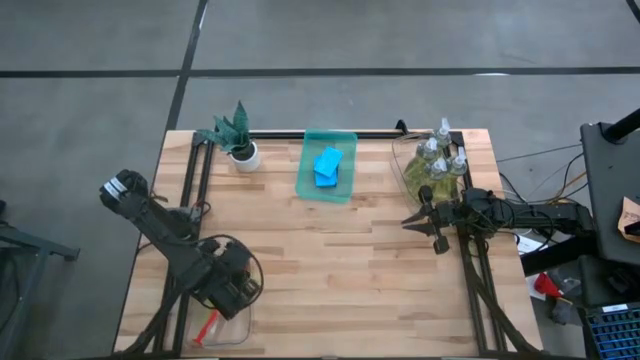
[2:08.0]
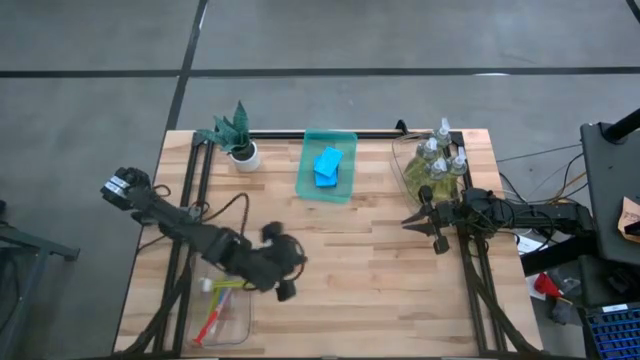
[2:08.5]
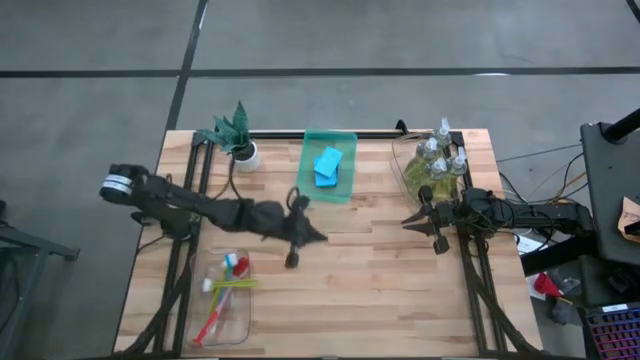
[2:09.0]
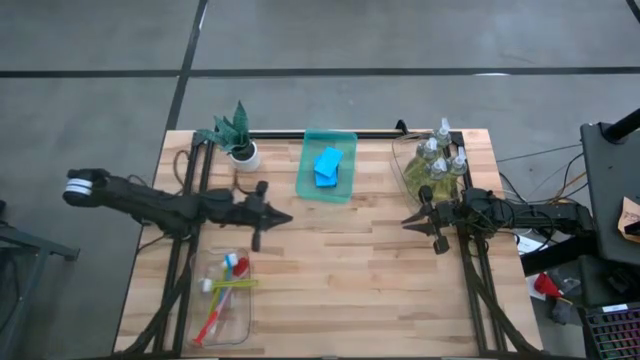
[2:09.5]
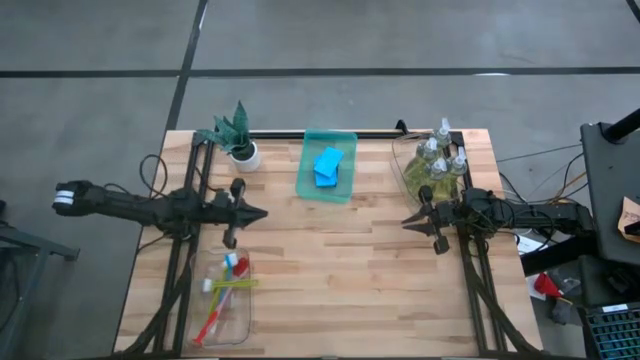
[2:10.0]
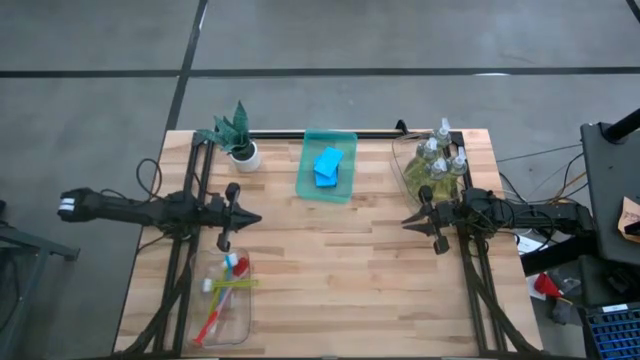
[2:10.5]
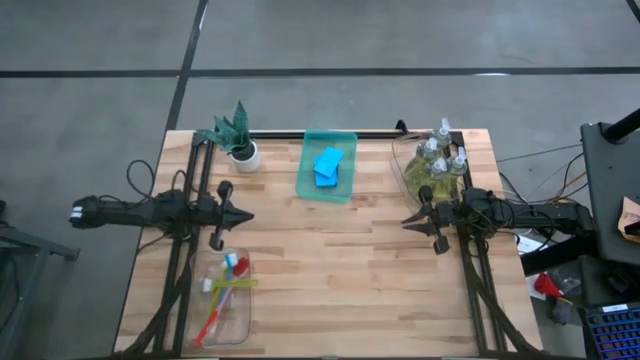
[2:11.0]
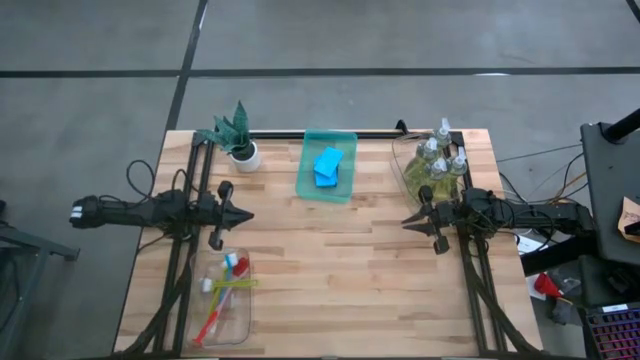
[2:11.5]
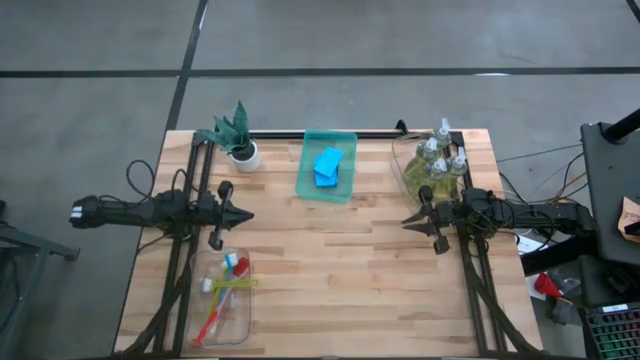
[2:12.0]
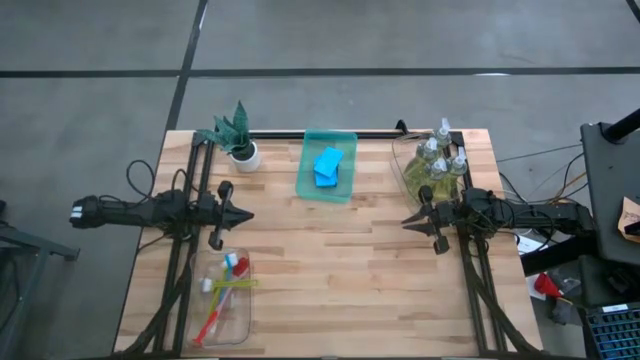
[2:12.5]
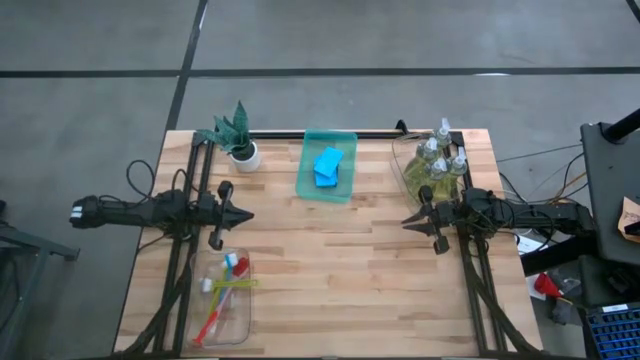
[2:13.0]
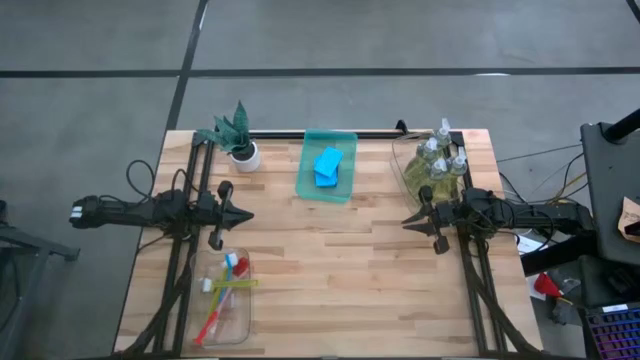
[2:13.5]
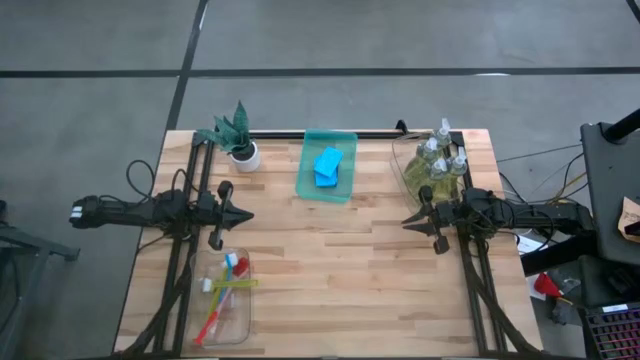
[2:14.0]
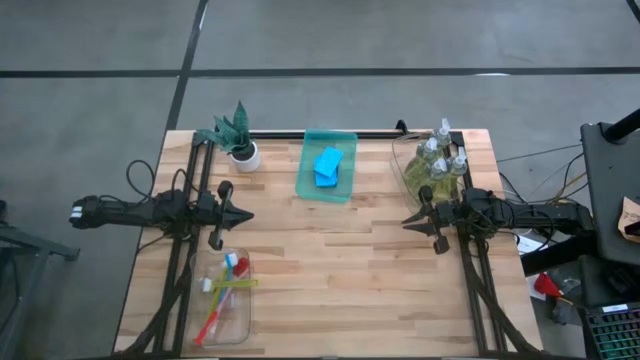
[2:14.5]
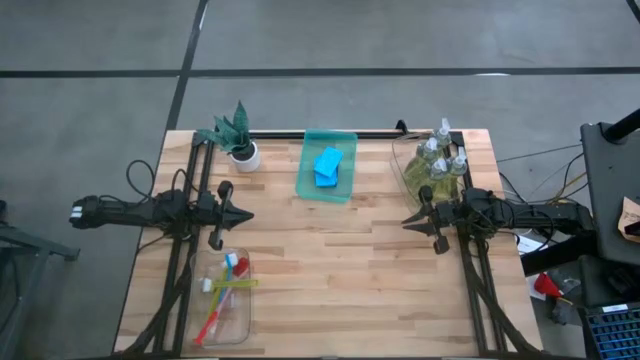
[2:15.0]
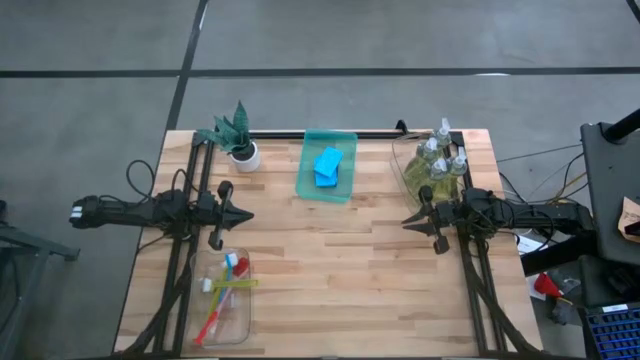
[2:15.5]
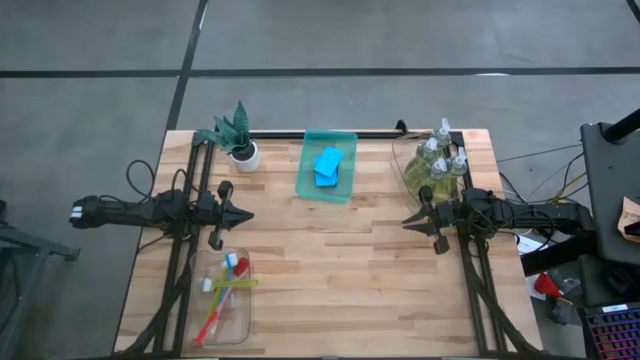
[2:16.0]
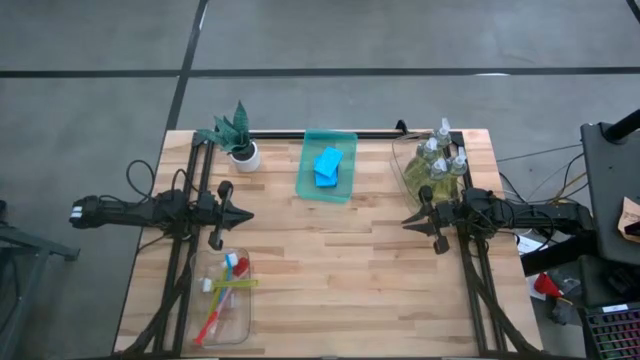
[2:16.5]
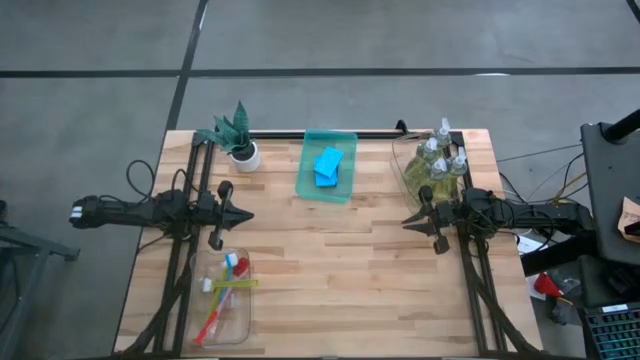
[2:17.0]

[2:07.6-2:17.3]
Task: Pick & Place Kitchen Sink Supplies
Return to Home Position
